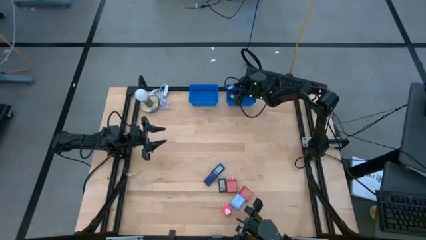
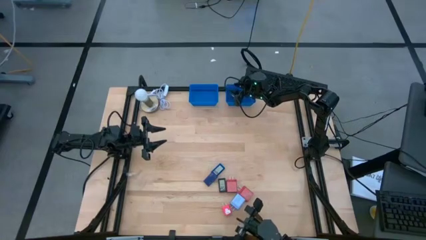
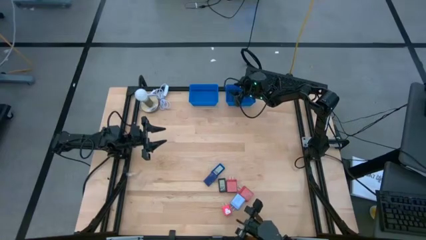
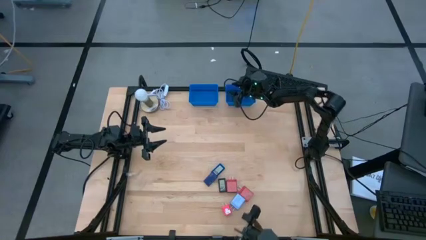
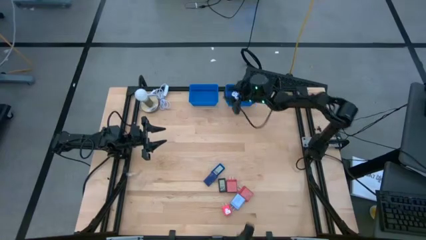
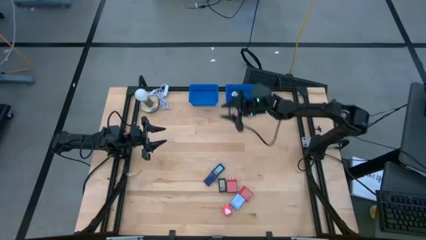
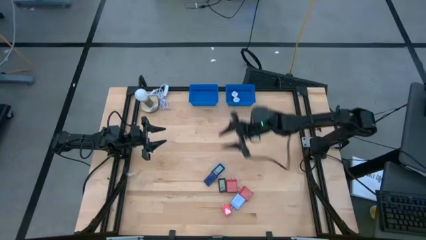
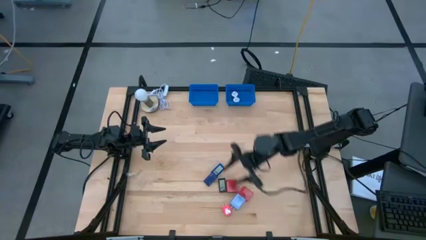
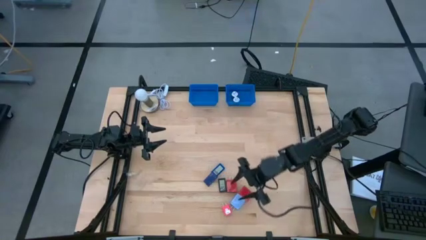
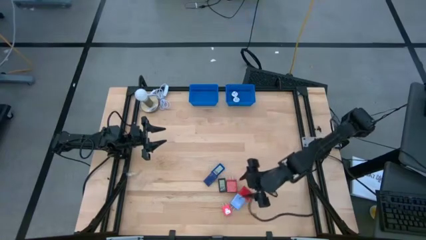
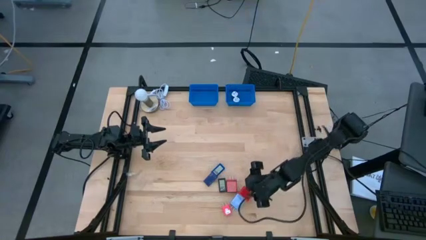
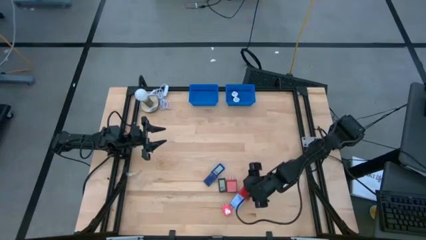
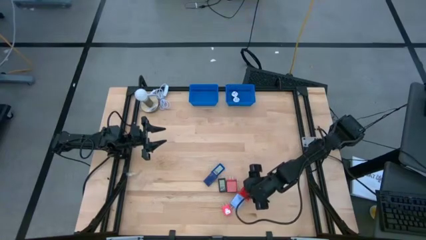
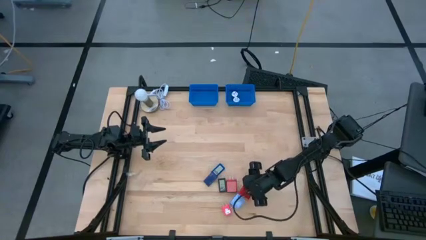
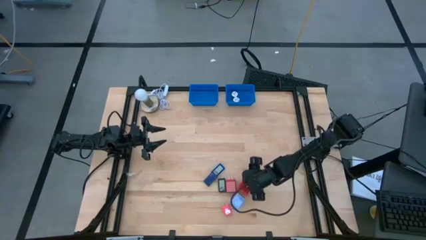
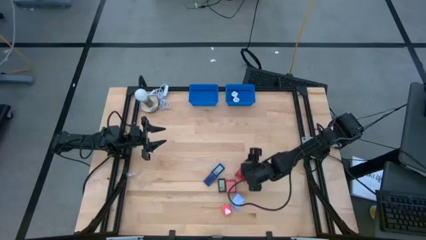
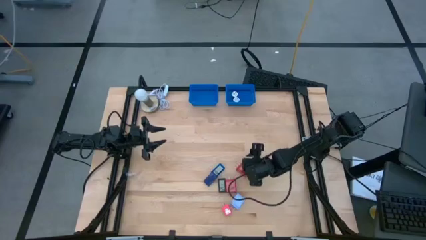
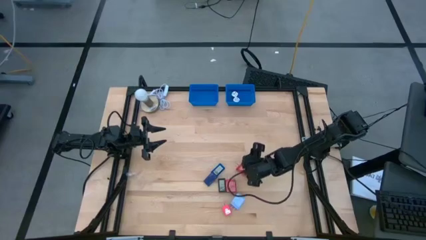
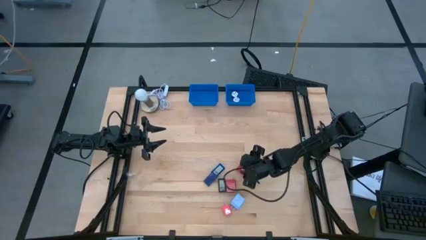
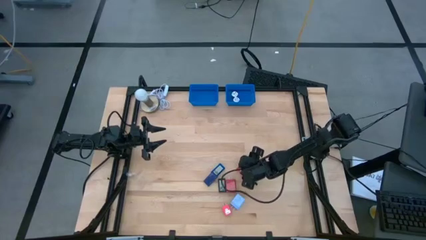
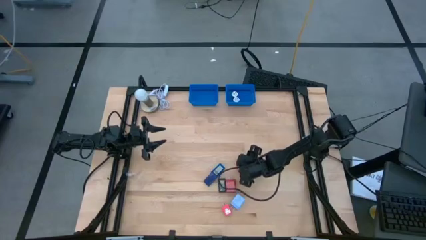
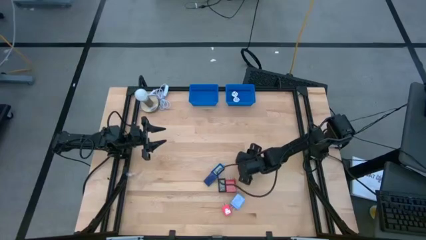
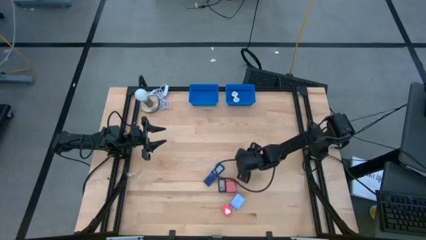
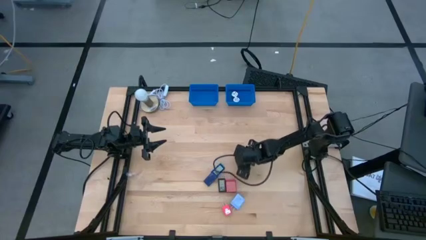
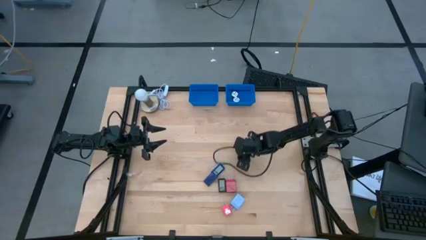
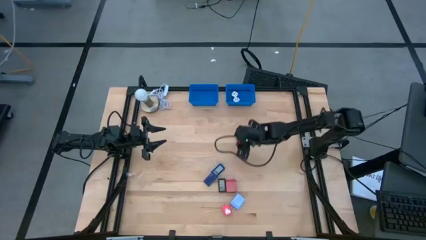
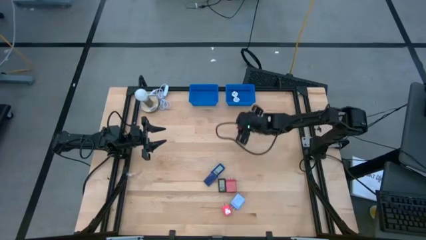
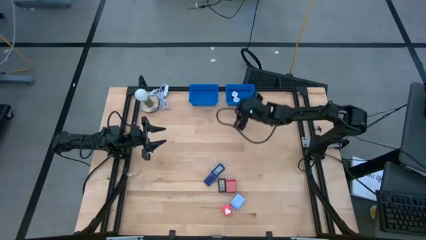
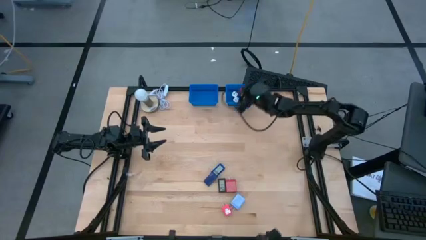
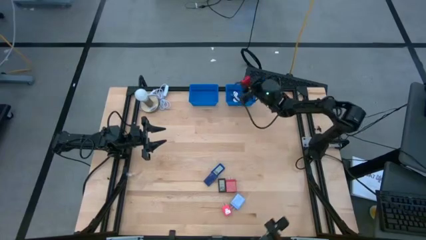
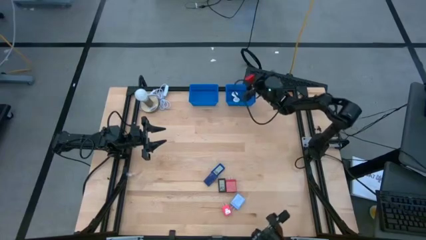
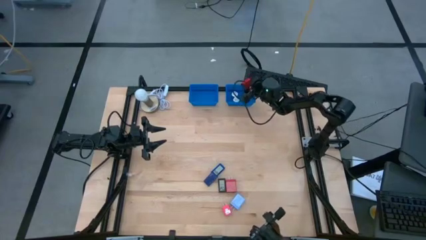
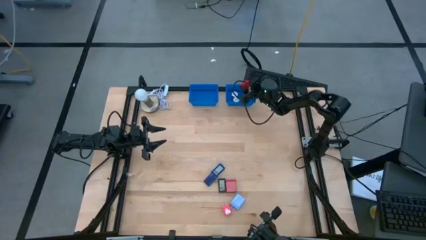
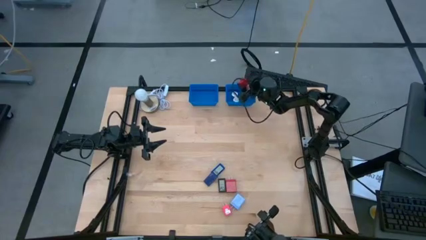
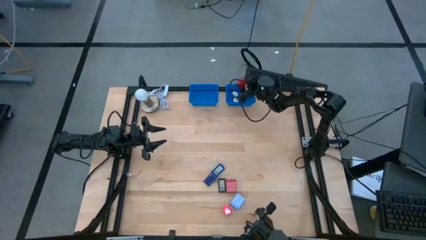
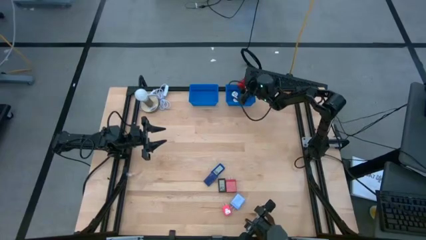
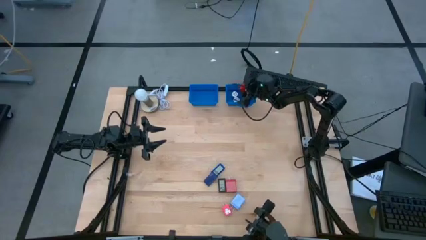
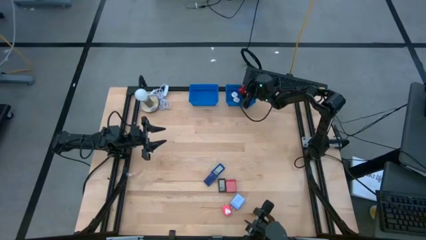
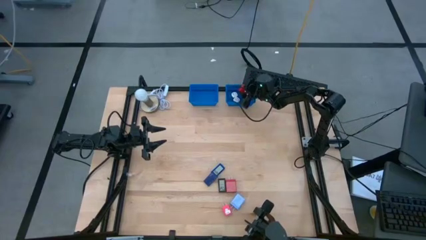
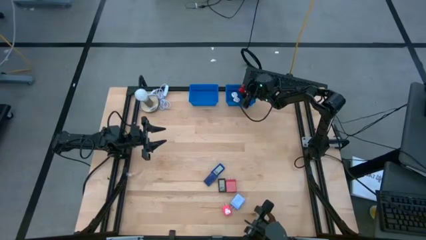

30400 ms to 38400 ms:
Task: Pick & Place Office items
Put the right red charger adapter into the right blue bin

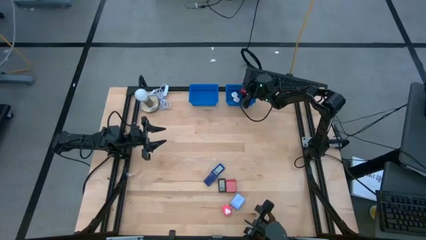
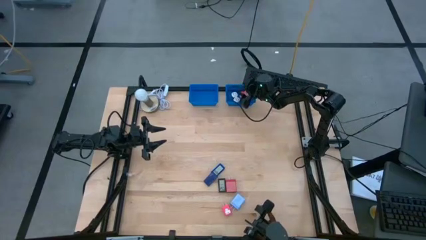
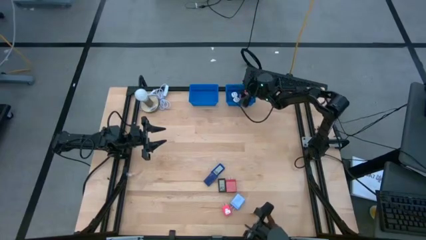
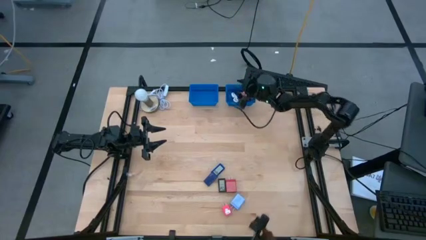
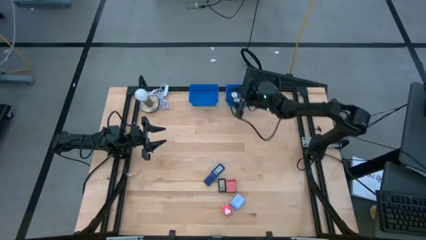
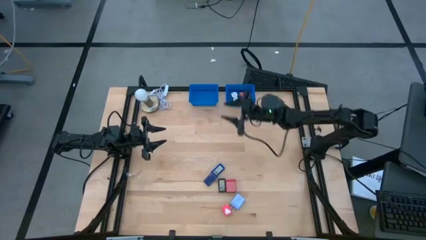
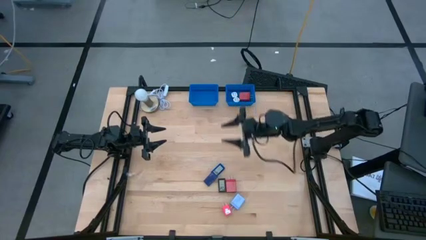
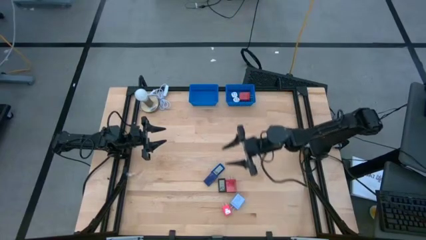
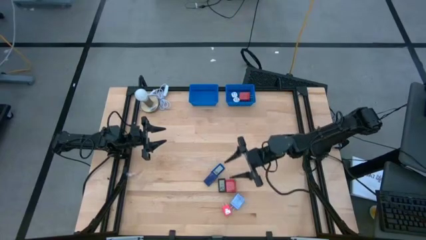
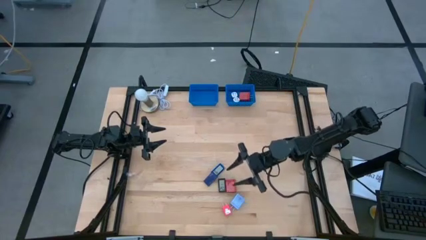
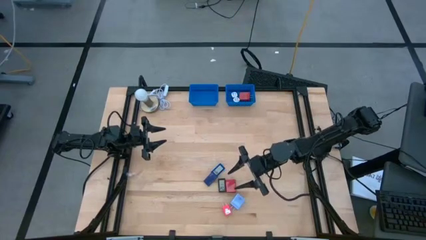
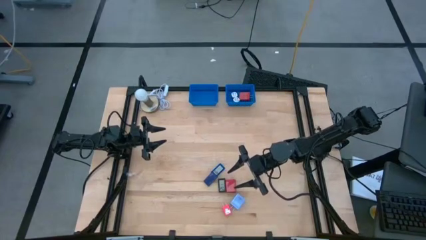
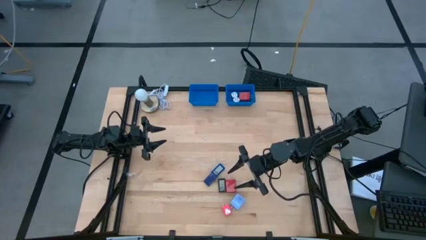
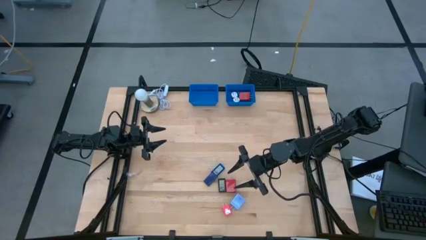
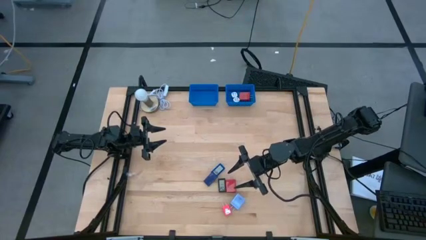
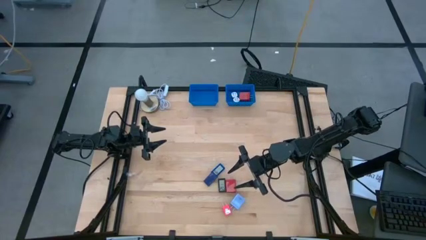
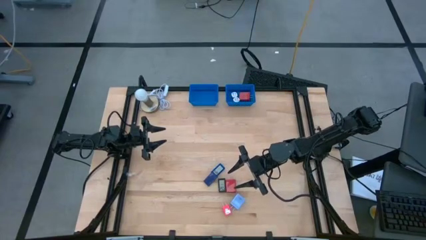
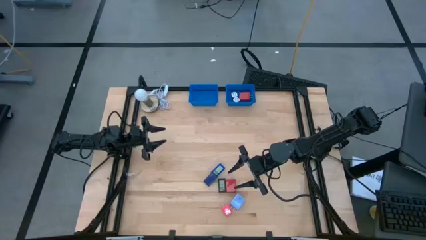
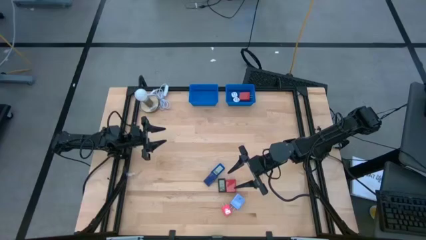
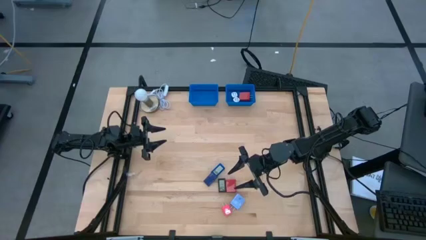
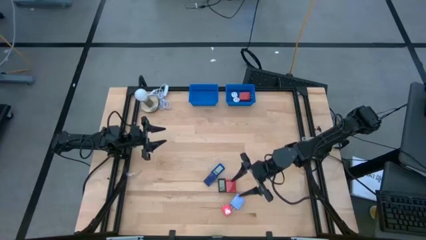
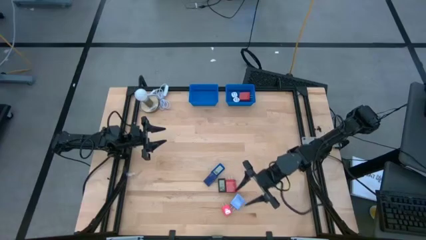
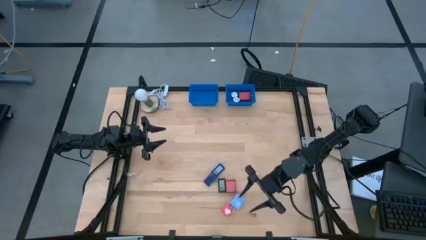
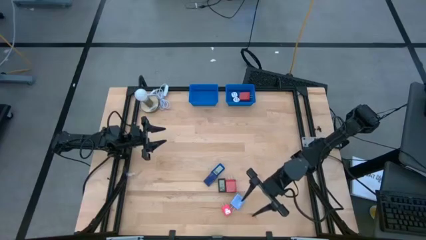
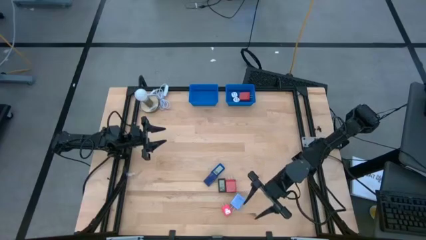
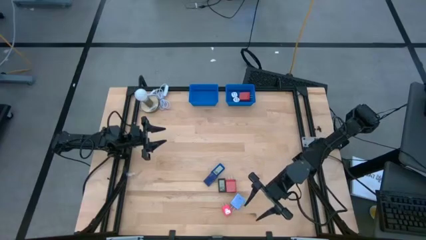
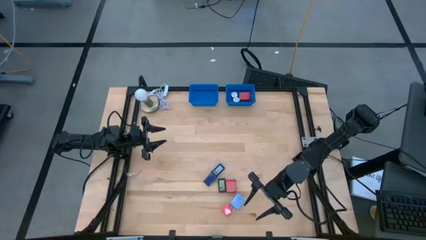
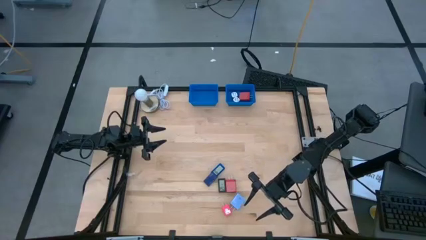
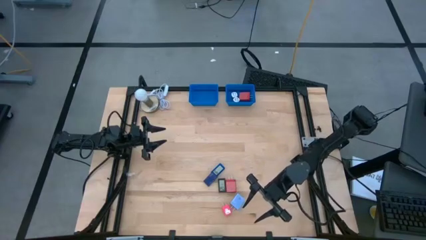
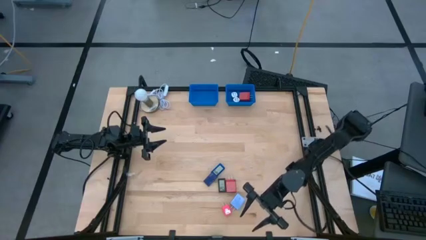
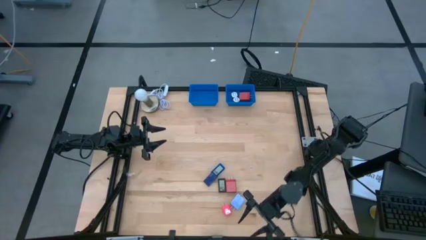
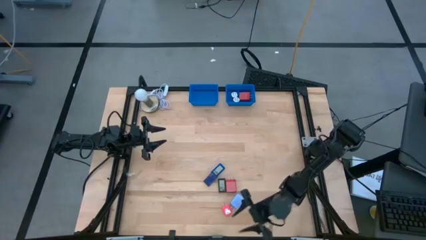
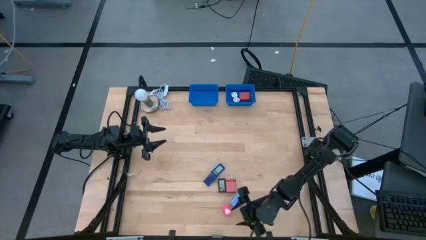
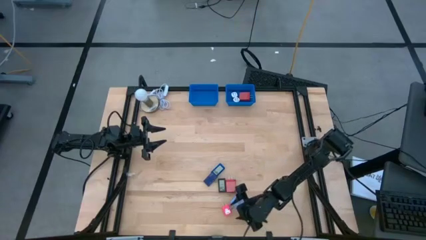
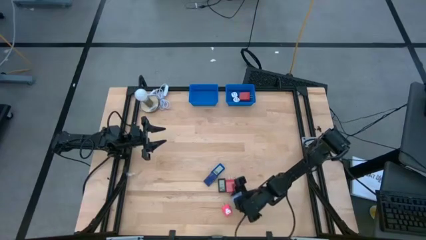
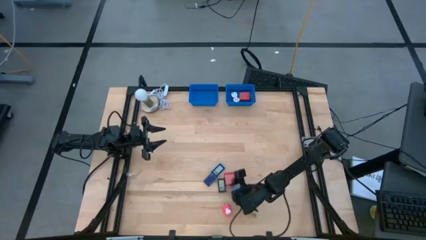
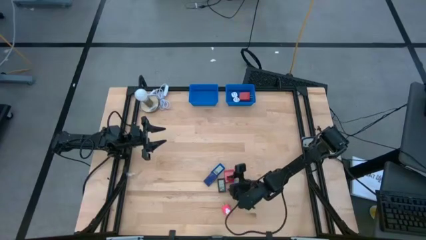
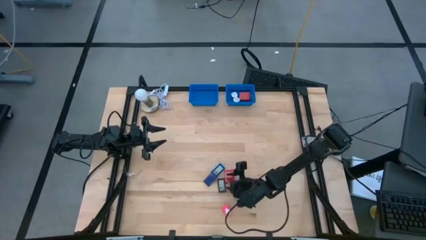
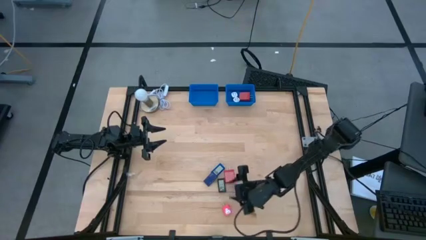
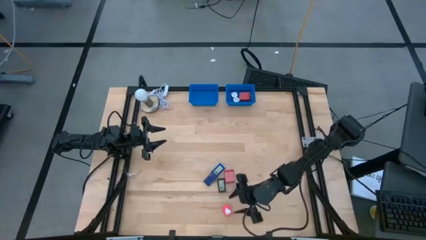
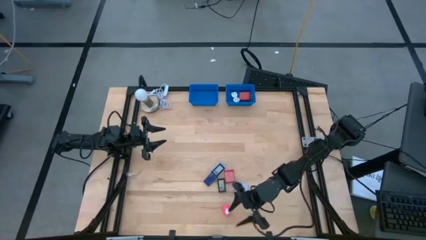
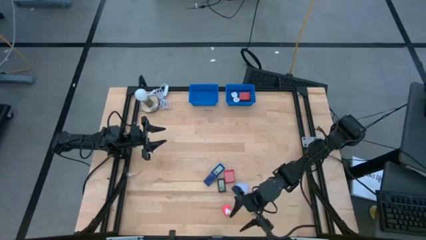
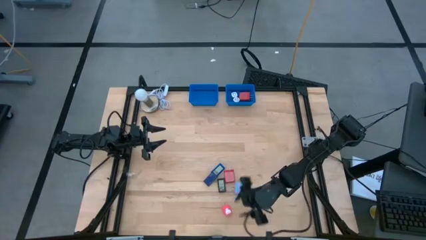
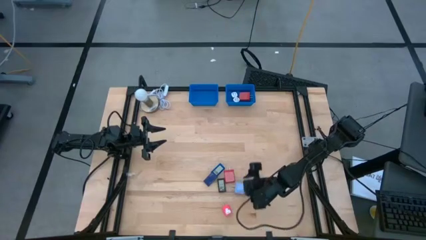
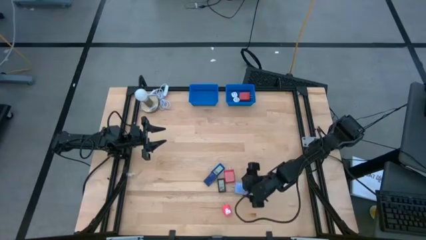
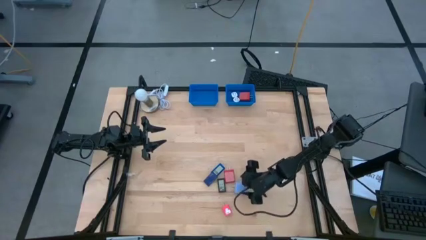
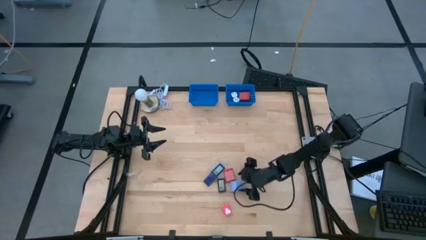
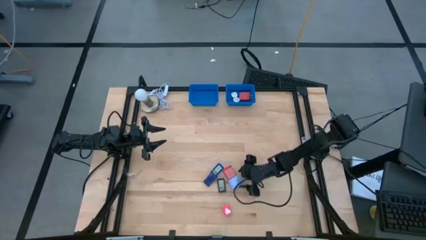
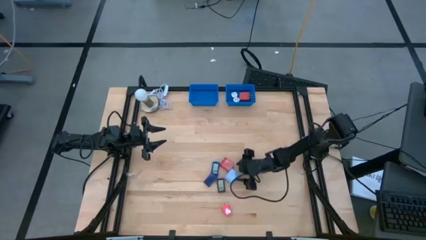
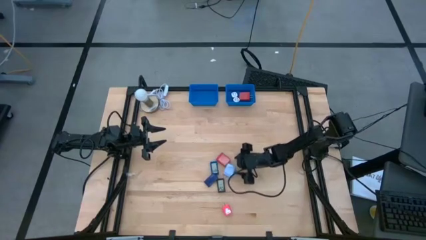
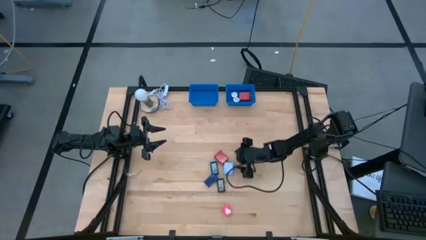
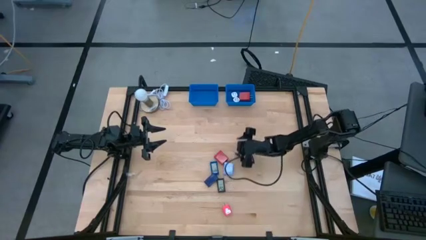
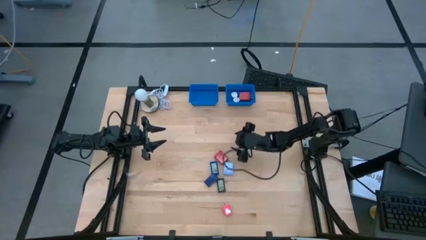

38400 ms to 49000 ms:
Put the red charger adapter into the right blue bin
